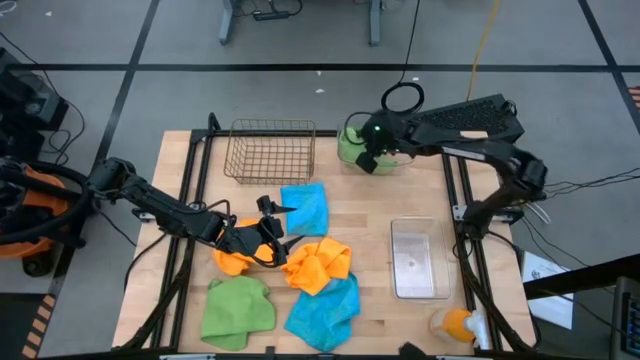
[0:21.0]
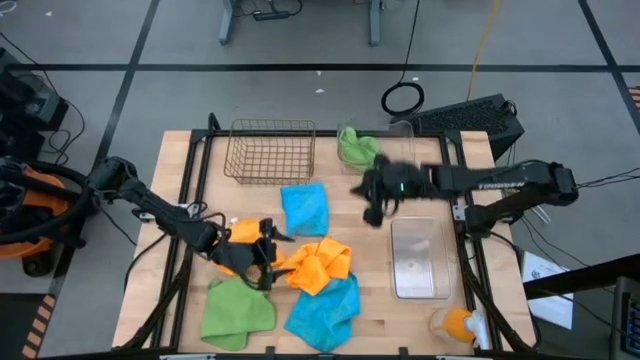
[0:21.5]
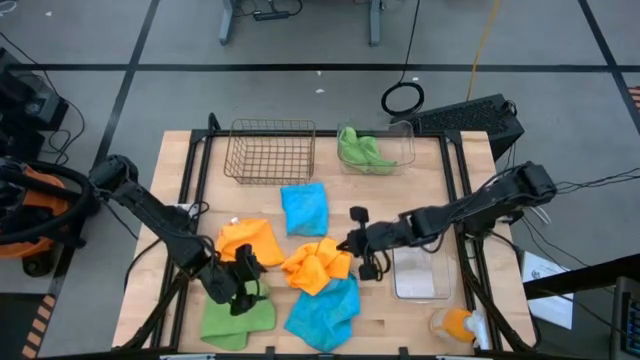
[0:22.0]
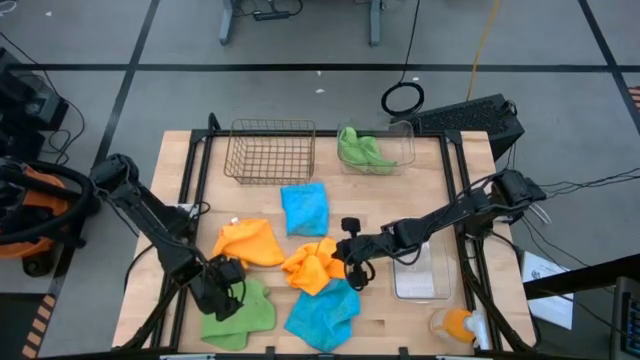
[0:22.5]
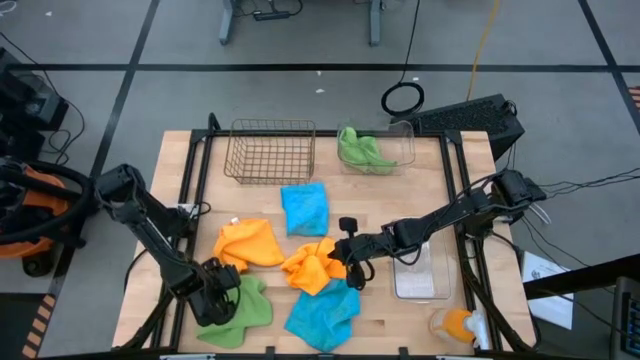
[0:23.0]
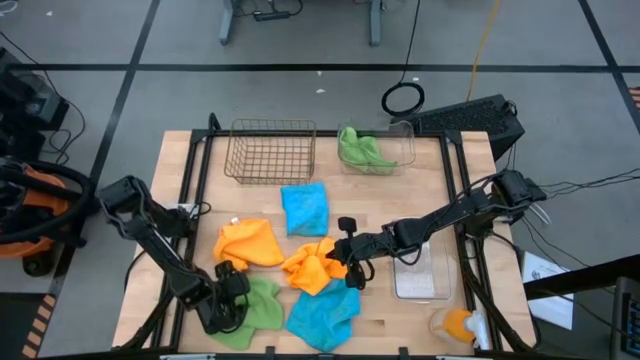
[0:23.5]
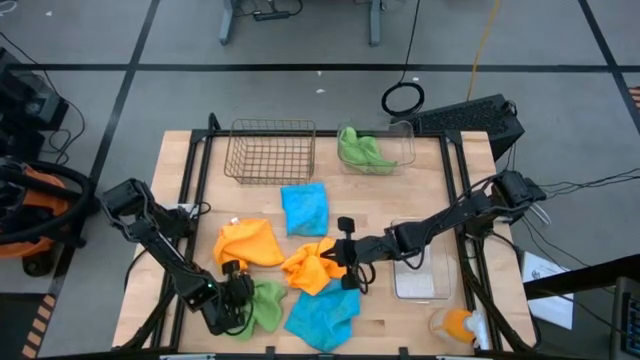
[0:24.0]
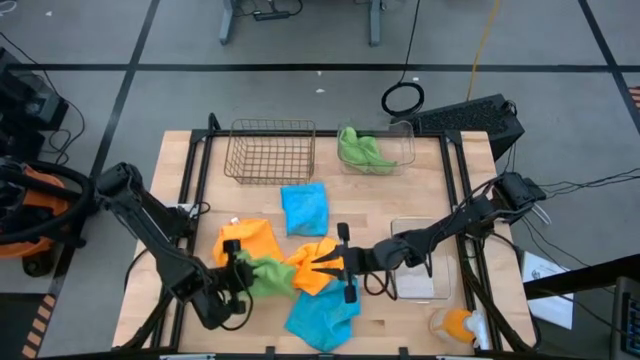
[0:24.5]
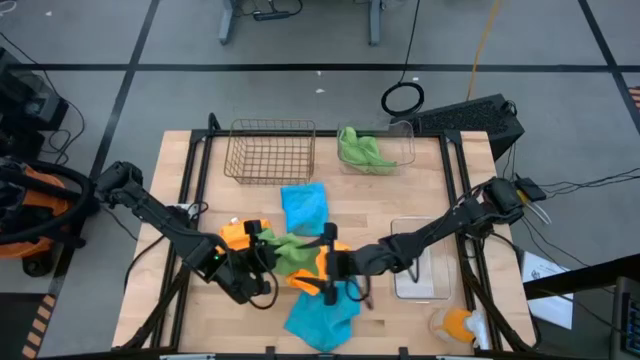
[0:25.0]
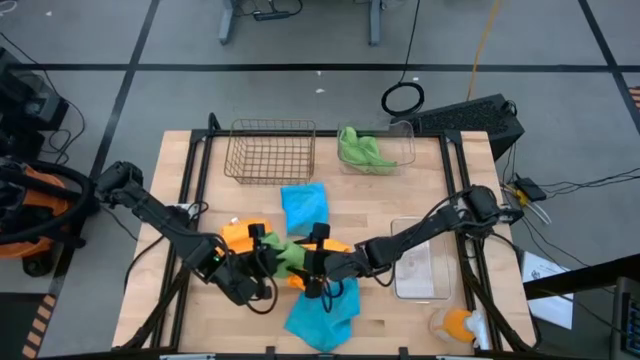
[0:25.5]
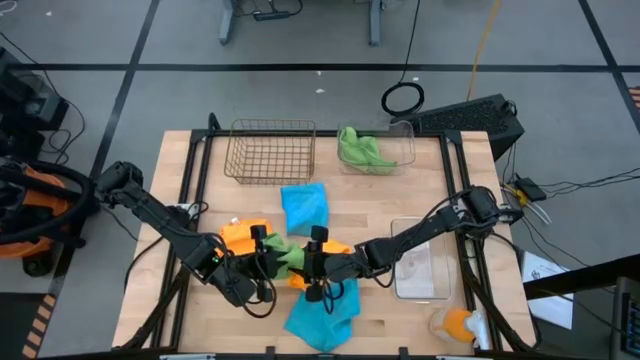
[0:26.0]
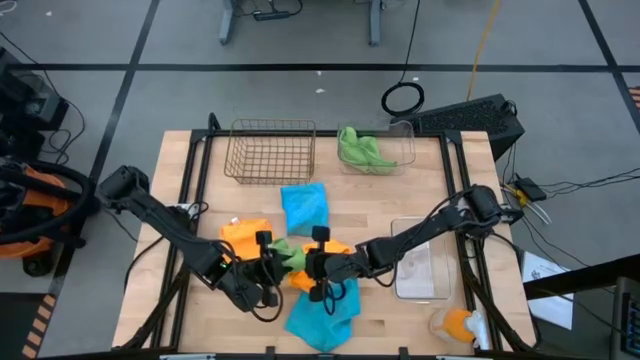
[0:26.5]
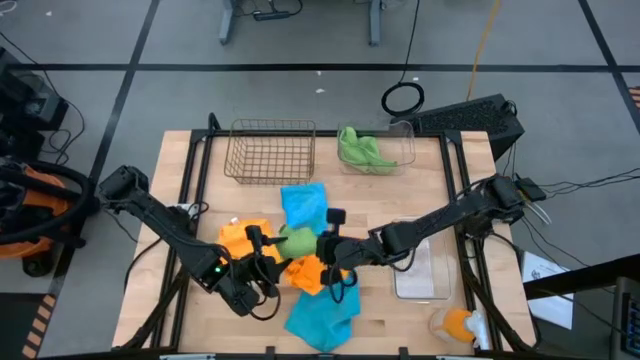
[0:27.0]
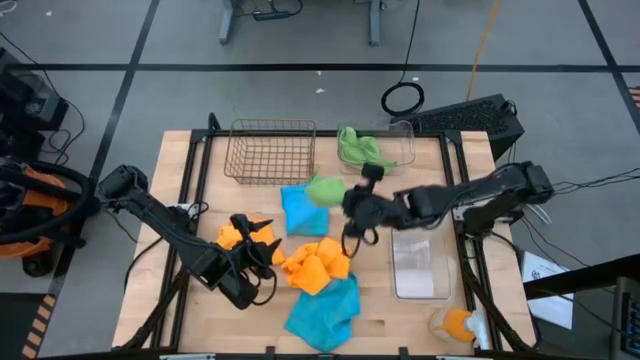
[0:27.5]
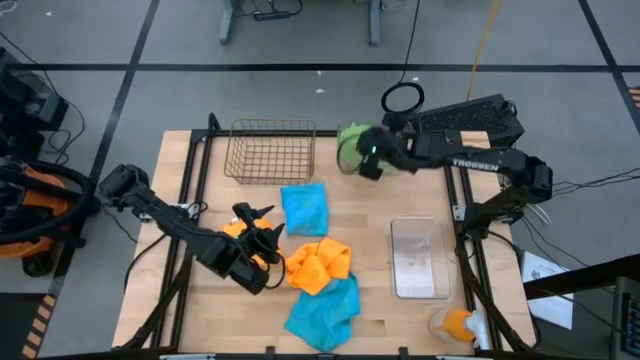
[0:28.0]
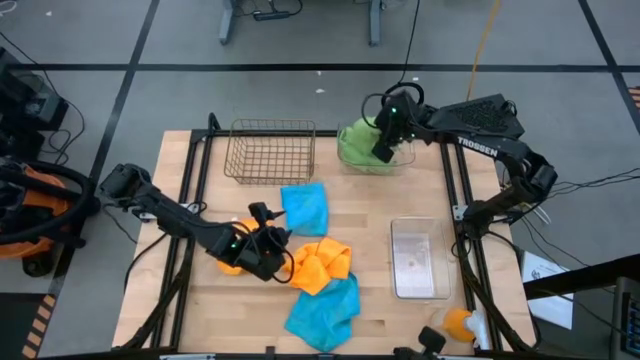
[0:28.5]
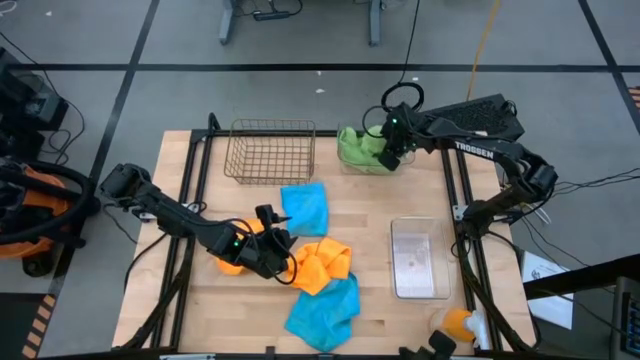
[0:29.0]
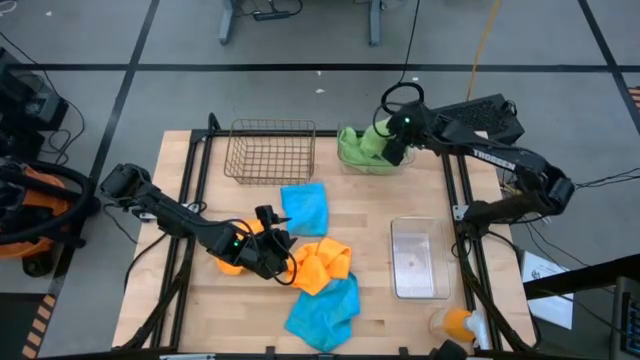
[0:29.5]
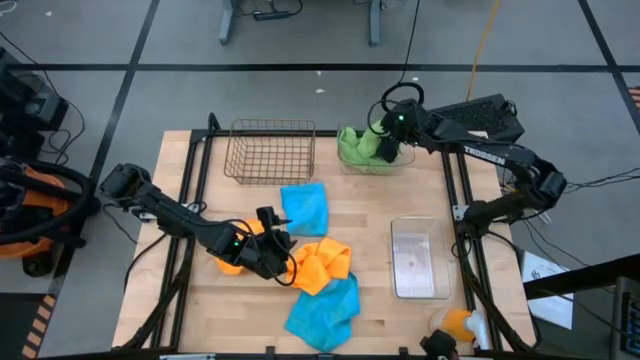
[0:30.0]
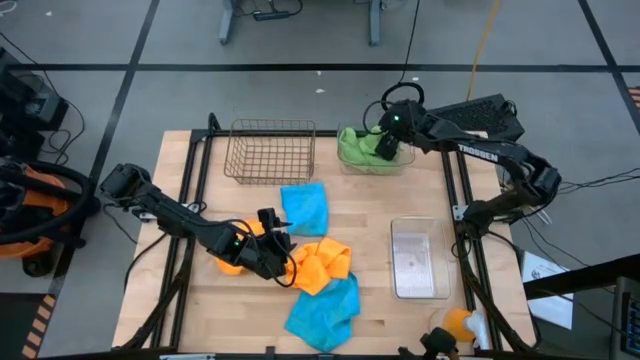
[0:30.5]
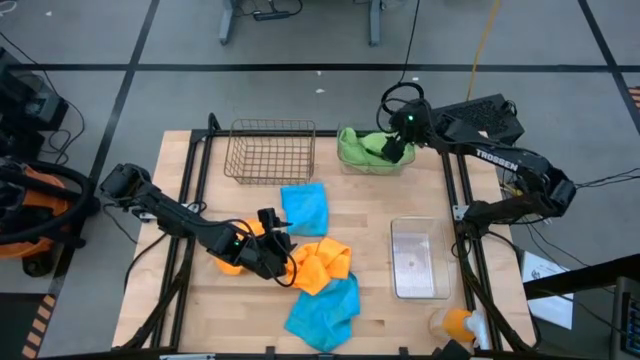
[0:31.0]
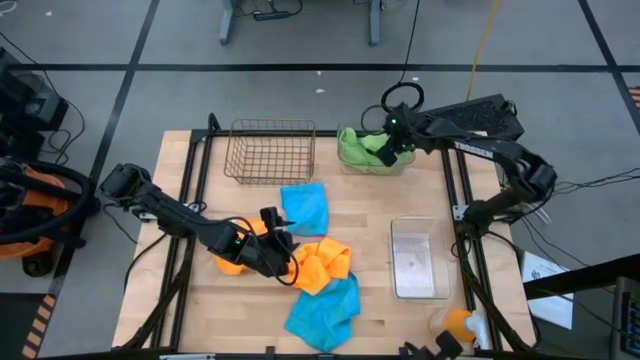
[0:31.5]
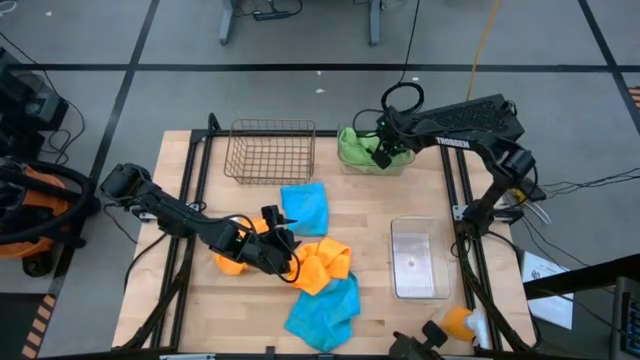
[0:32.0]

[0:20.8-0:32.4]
Task: Sort microfiber towel by color & place in baskets
Put the green microfiber towel into the top transparent bin

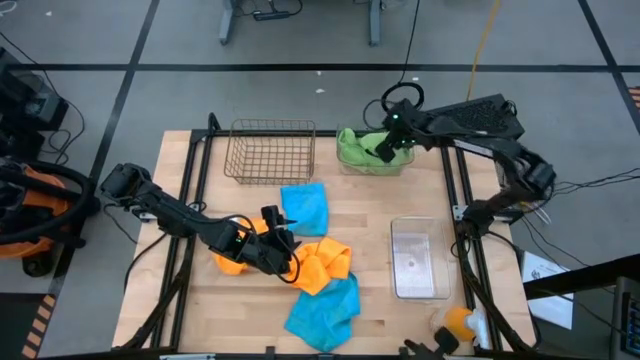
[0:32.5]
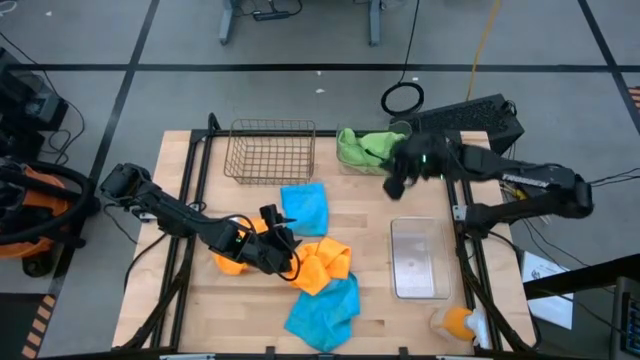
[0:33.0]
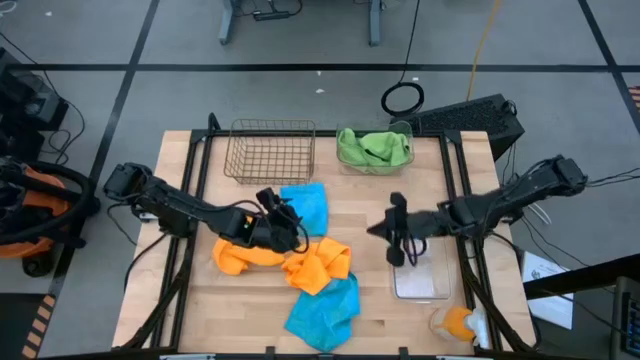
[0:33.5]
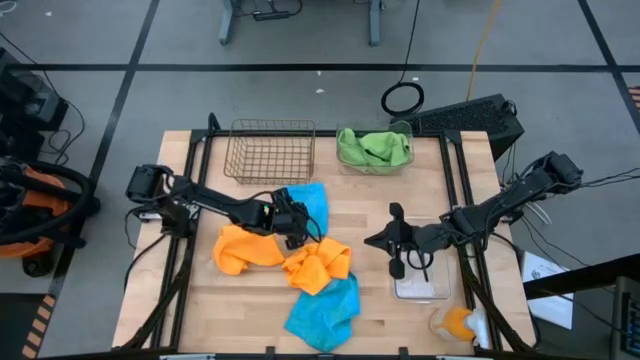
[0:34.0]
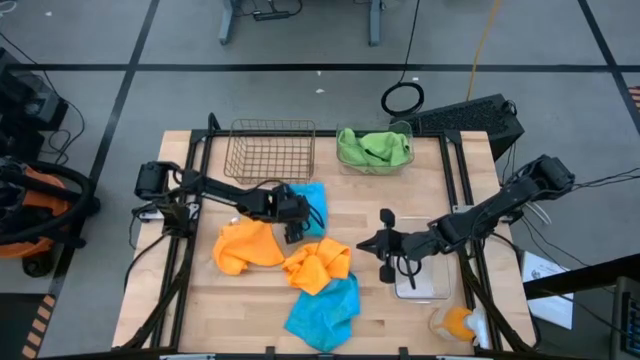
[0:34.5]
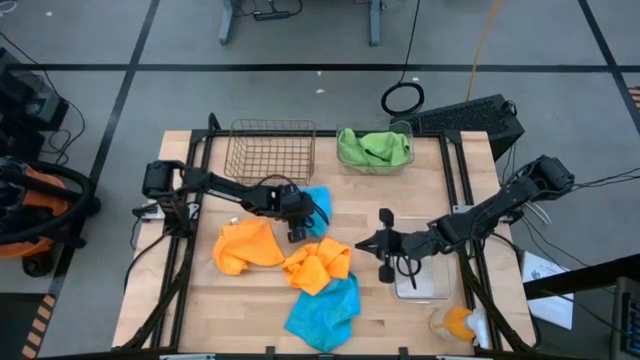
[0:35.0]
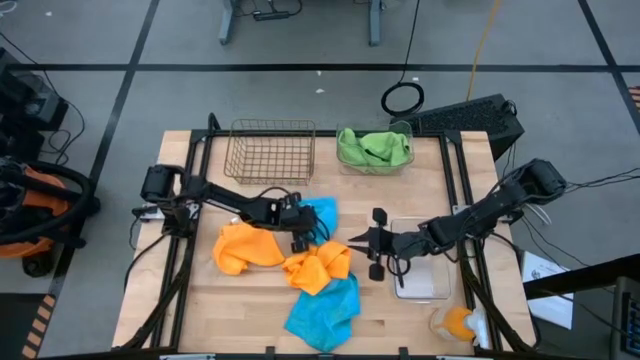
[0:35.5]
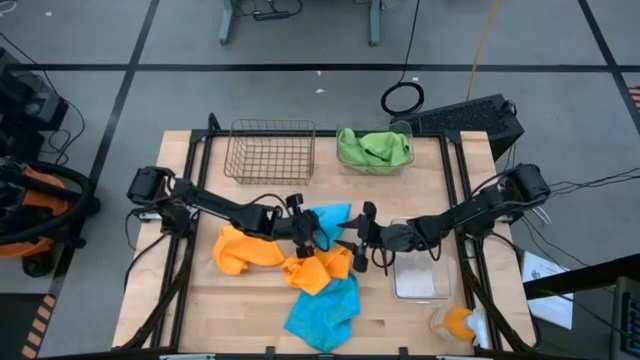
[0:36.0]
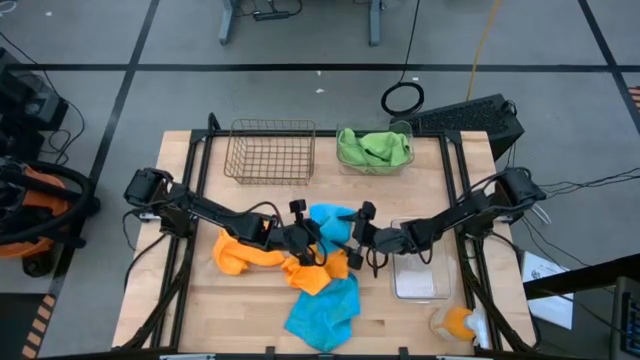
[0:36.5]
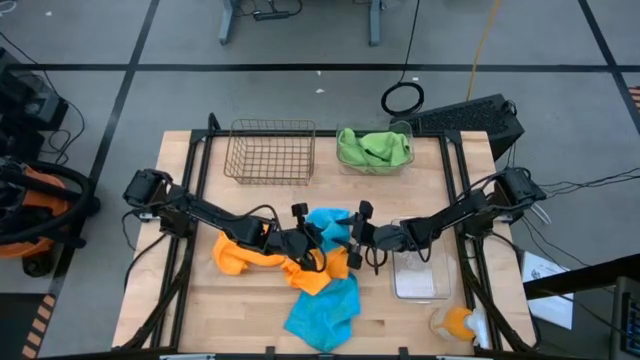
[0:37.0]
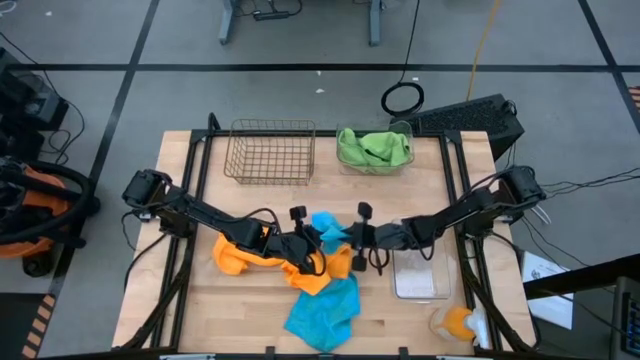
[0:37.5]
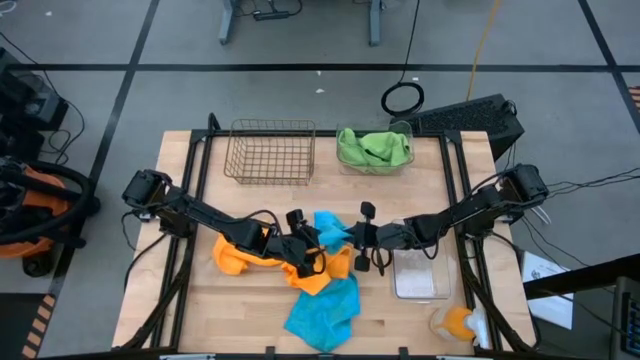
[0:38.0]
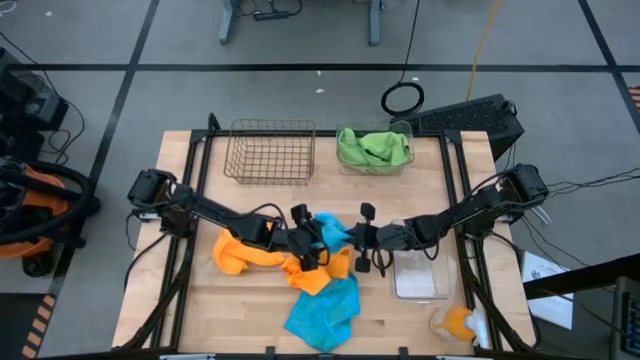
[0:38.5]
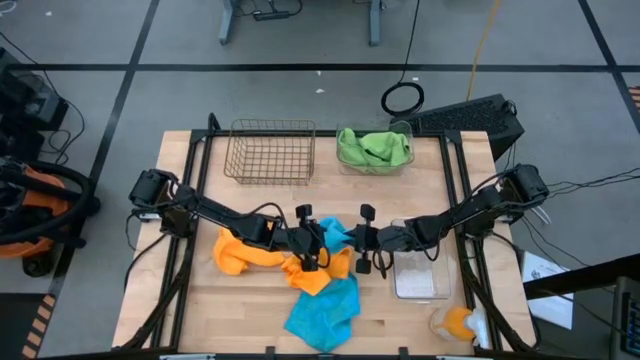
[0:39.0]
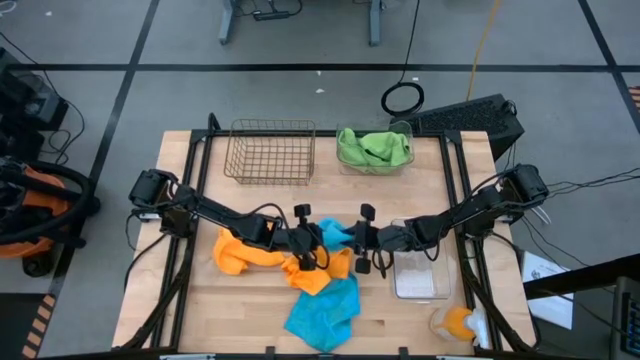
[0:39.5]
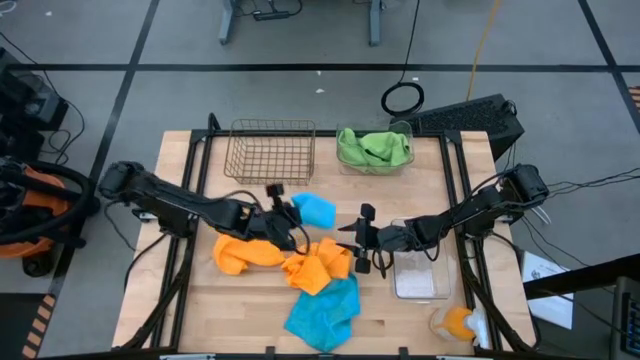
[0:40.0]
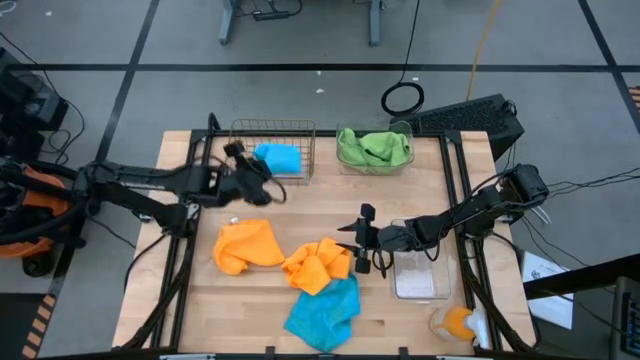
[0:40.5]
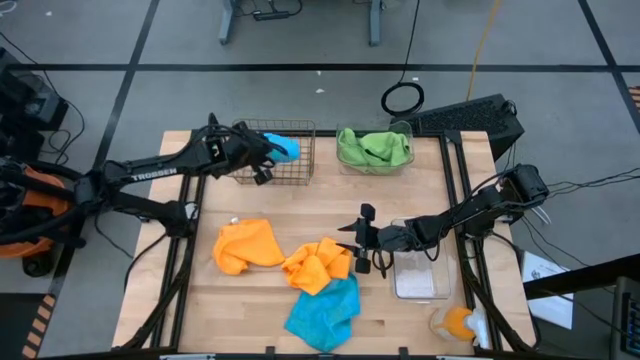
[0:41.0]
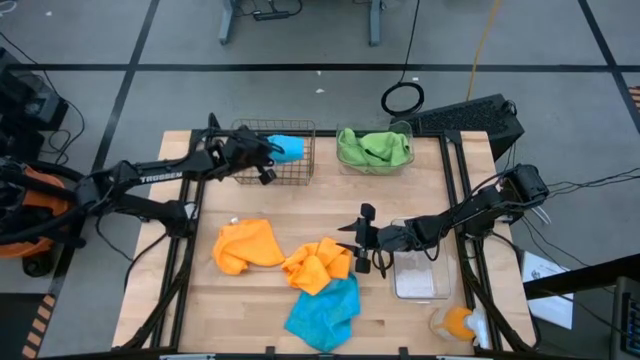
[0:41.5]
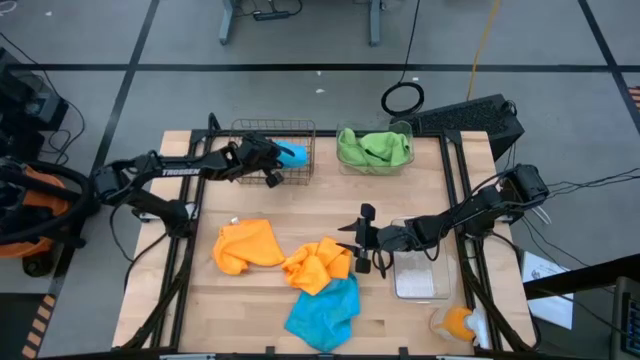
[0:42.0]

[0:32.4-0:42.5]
Put the top blue microfiber towel into the wire basket
